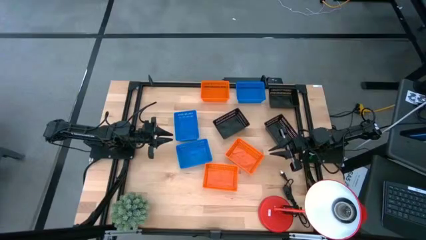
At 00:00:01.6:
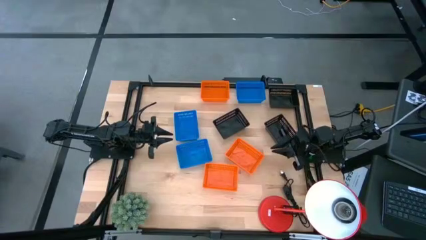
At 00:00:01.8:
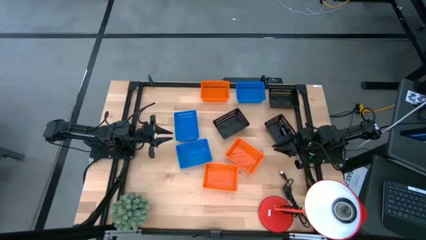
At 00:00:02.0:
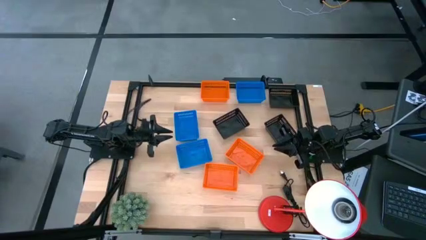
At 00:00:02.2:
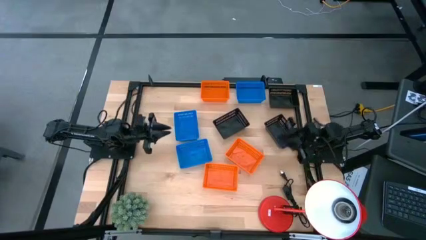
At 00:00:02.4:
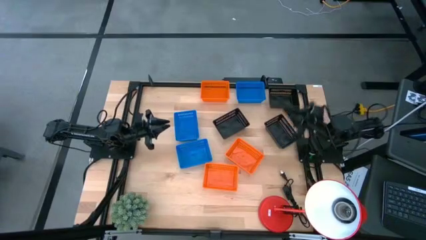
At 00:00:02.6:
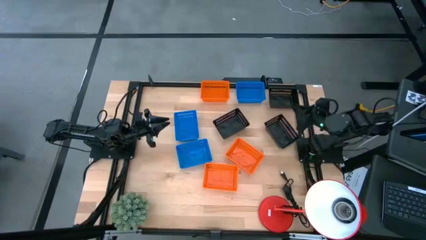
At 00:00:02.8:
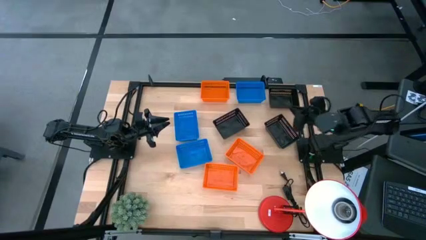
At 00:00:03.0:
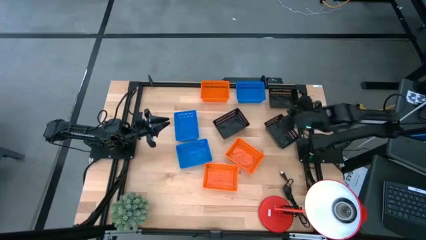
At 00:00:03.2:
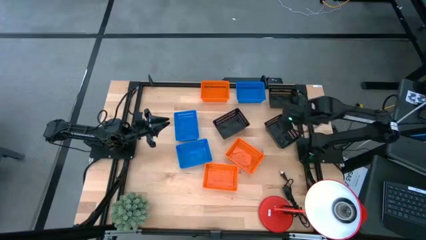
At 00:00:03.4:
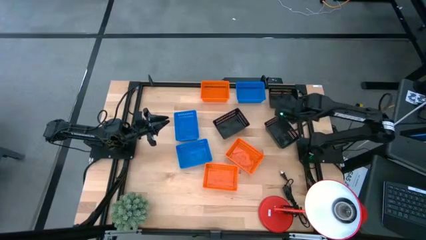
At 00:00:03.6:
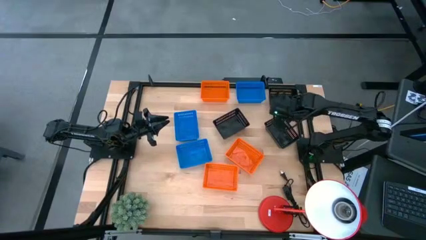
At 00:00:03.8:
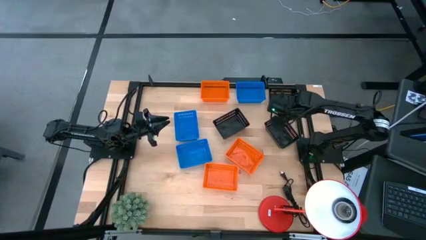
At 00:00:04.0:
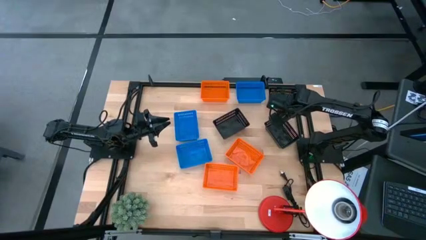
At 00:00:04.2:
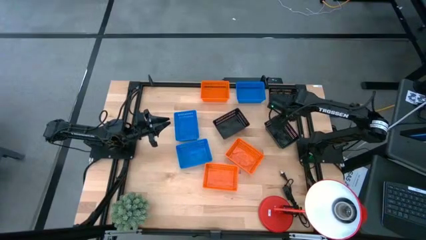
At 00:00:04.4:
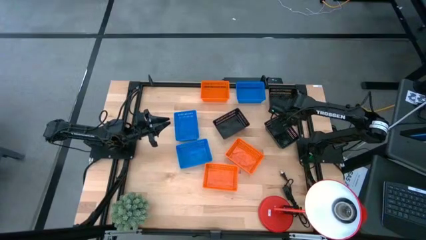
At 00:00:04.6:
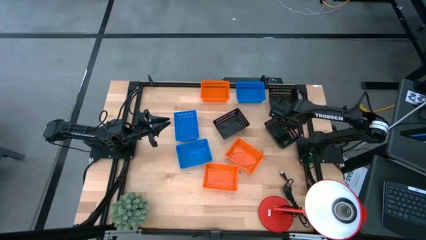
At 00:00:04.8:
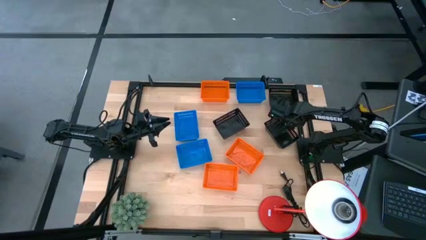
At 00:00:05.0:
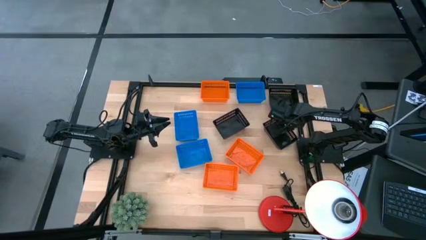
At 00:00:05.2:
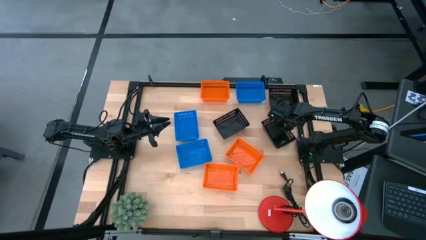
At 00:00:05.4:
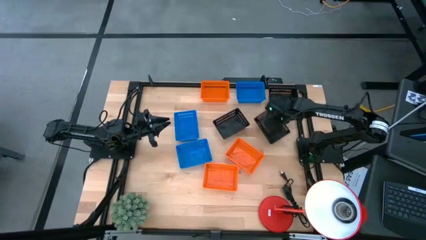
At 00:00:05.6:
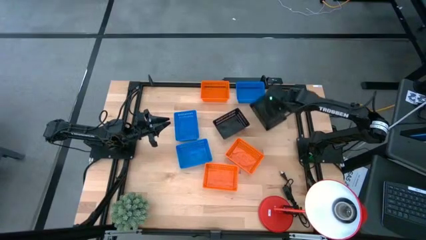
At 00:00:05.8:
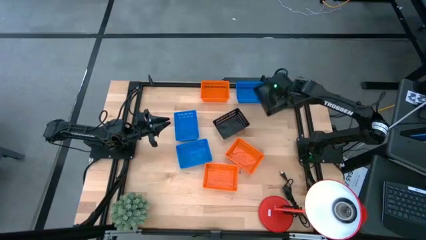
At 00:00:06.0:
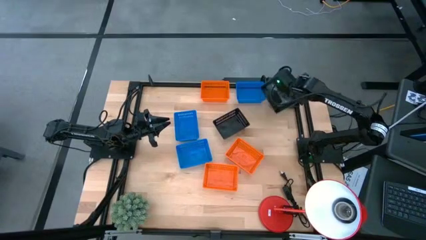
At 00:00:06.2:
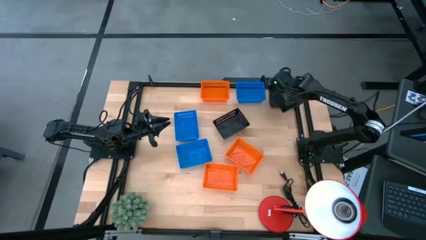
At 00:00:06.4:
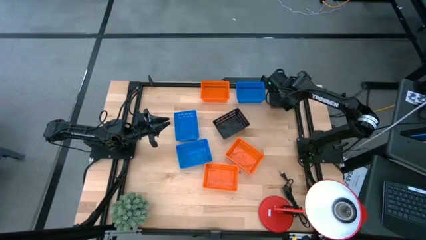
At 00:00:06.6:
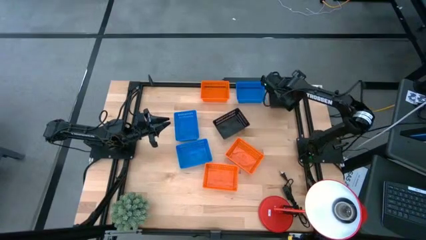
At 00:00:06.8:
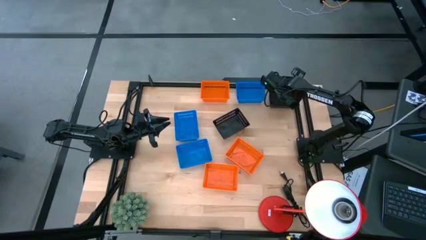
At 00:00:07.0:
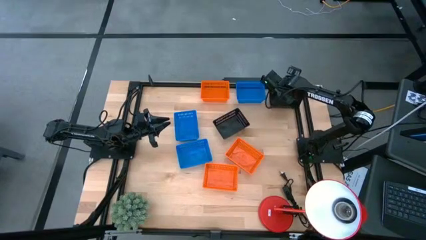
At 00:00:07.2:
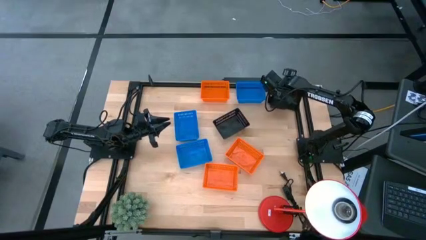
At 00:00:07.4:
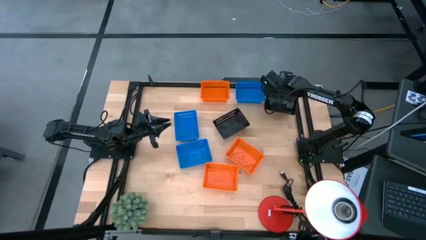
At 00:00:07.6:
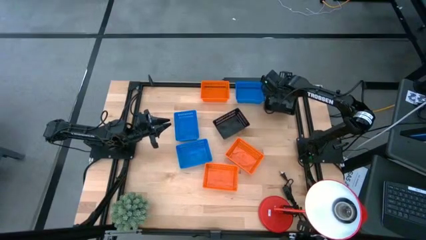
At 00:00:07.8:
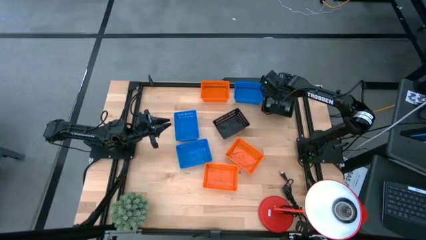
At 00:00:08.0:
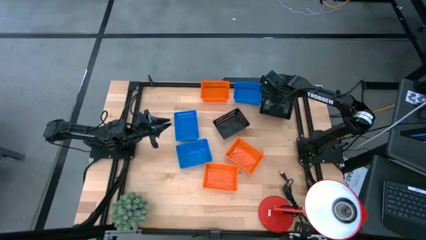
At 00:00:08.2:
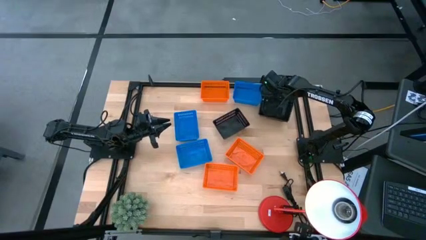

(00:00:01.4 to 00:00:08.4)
Stack the bottom right black bin on top of the top black bin

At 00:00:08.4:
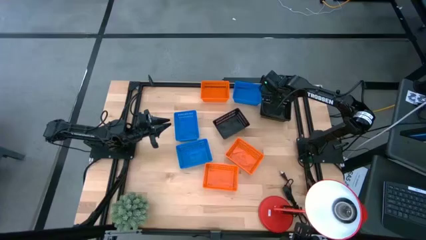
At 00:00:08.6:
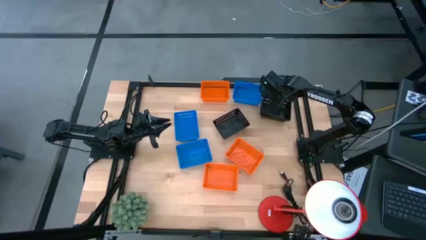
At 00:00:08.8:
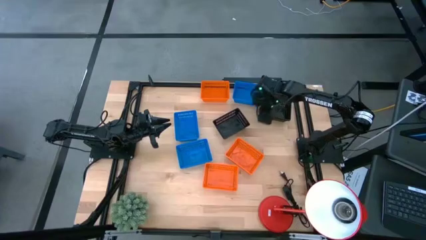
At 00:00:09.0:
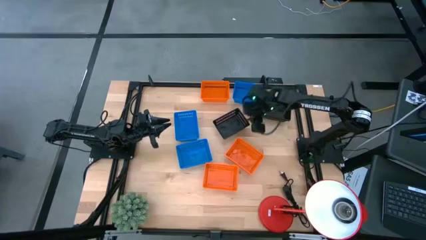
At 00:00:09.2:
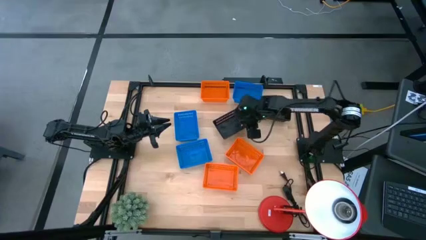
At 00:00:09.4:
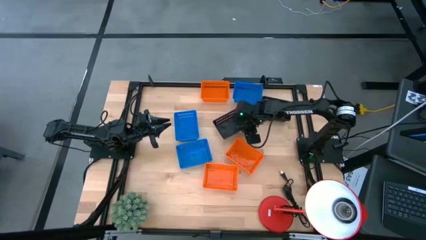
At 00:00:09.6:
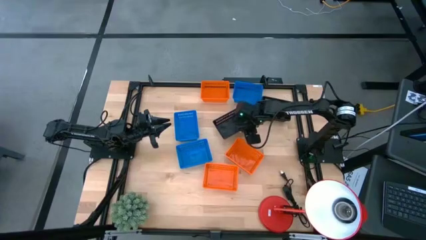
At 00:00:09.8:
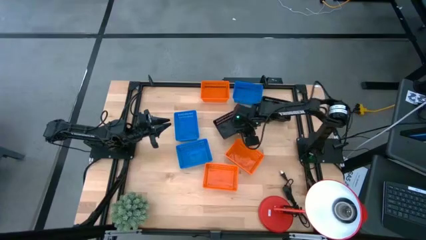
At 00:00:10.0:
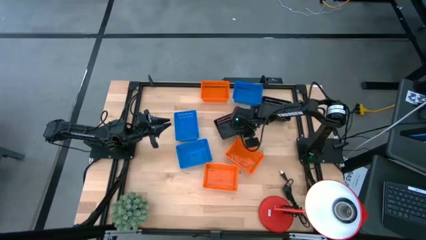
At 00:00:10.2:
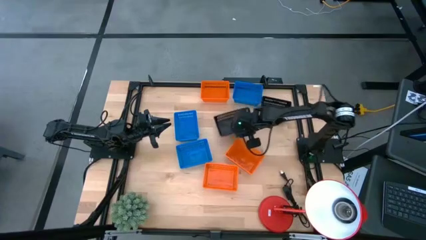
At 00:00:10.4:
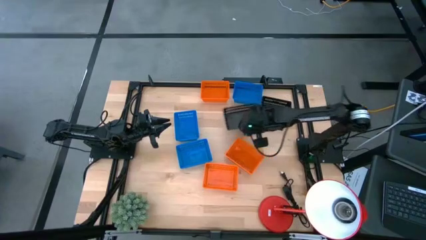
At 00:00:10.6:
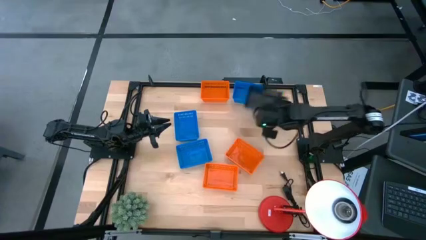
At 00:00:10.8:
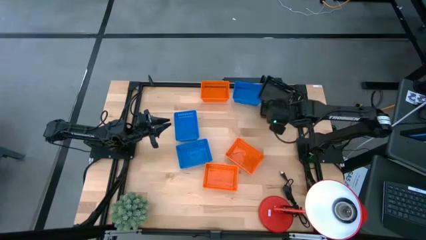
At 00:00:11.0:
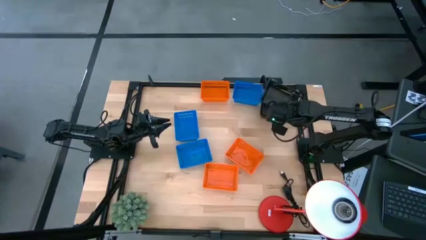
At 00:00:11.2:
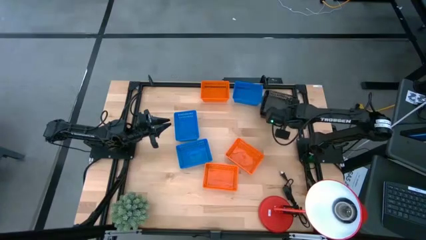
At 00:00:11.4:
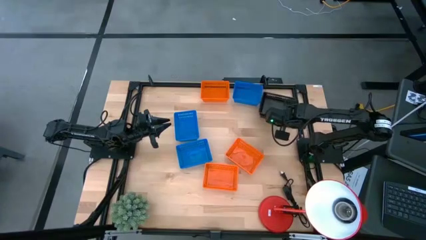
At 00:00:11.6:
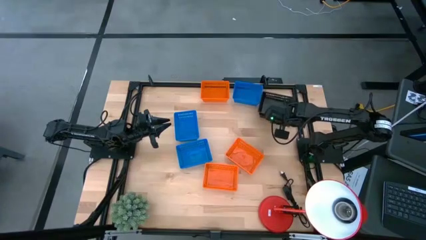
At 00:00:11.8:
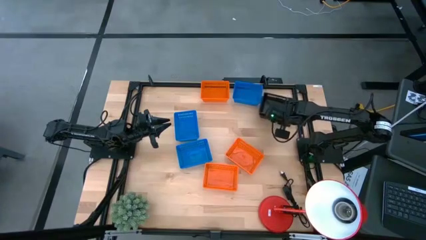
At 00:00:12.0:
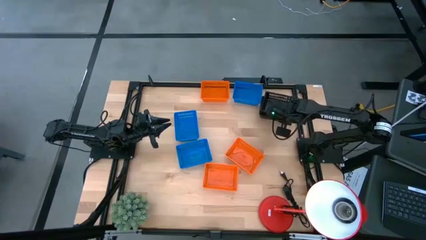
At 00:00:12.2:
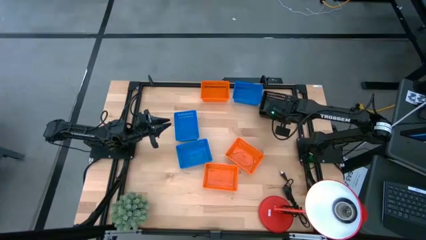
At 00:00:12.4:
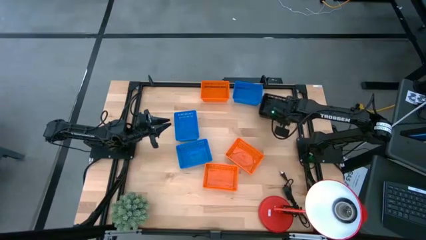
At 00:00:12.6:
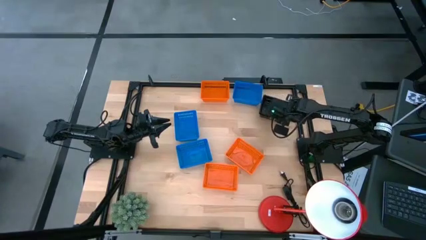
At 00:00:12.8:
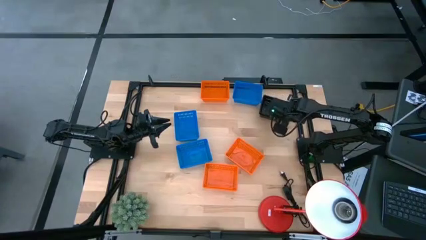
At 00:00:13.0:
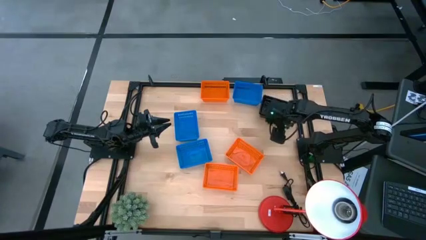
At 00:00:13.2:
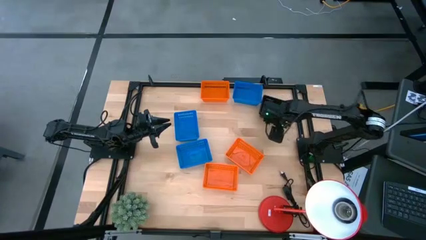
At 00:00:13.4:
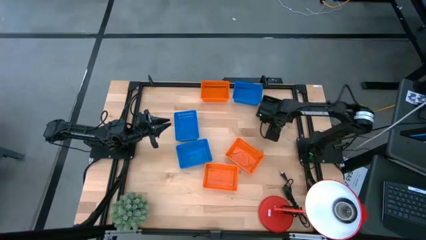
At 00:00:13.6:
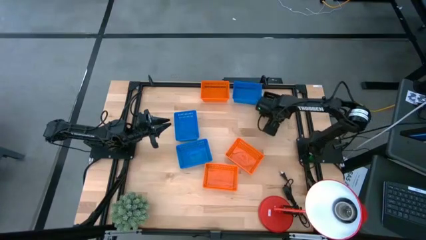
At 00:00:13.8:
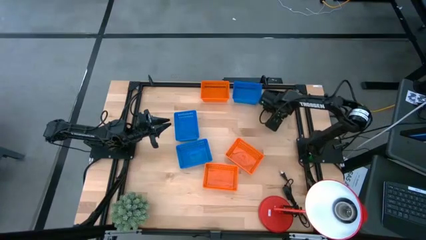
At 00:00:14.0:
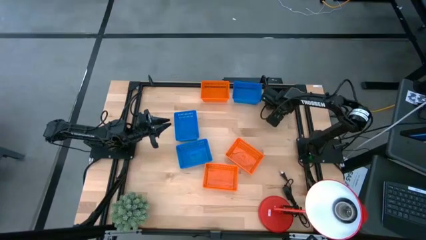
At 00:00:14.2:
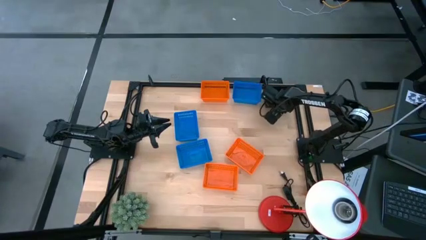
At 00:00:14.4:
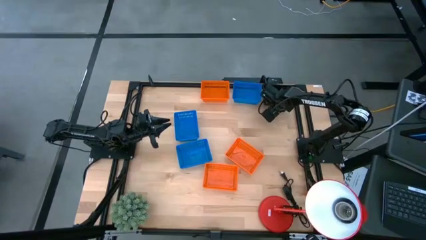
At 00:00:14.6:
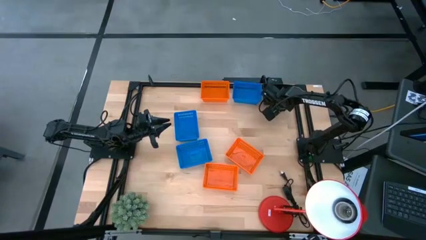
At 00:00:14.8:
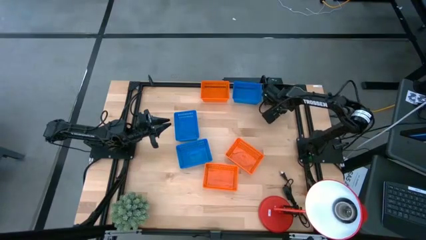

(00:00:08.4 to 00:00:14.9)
Stack the left black bin on top of the right black bin
